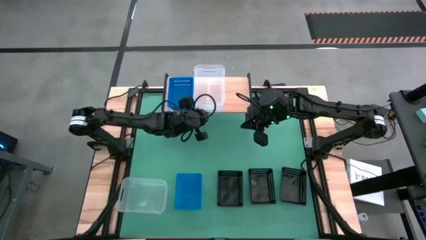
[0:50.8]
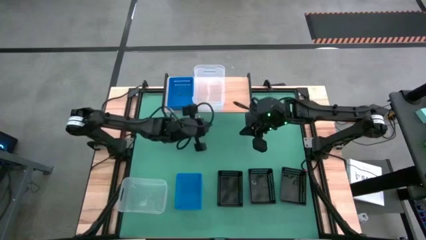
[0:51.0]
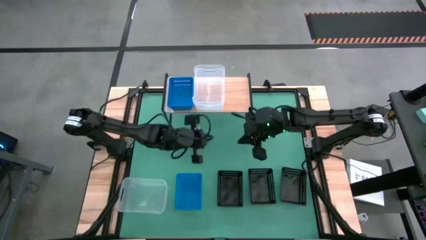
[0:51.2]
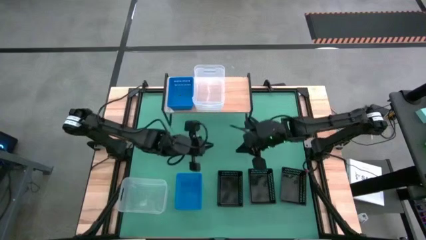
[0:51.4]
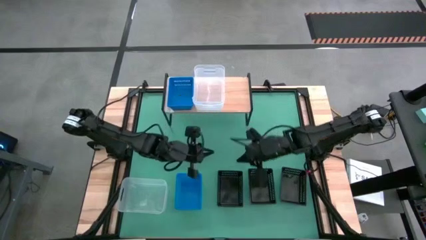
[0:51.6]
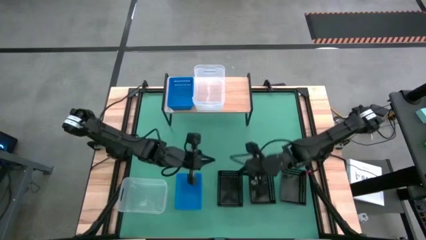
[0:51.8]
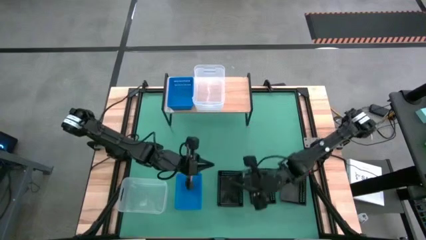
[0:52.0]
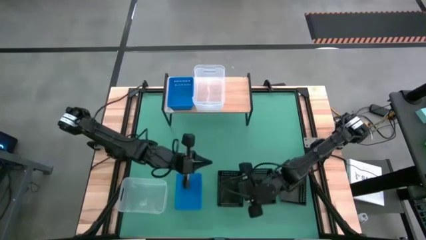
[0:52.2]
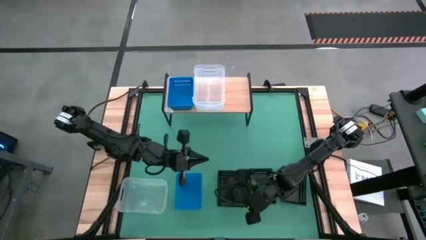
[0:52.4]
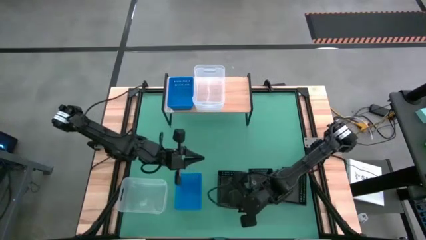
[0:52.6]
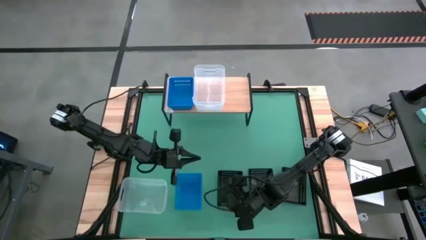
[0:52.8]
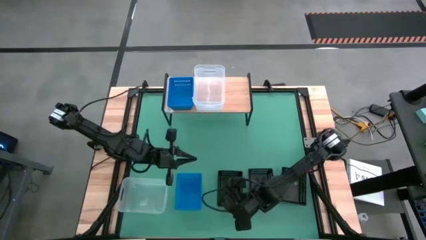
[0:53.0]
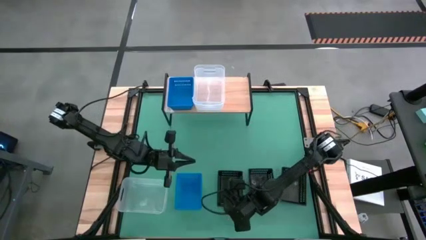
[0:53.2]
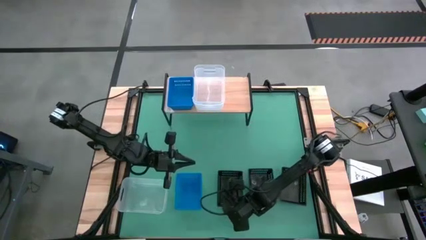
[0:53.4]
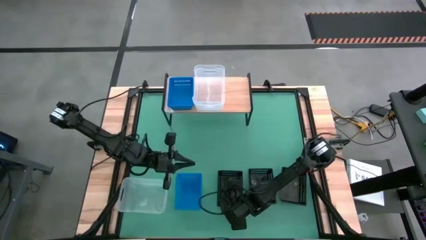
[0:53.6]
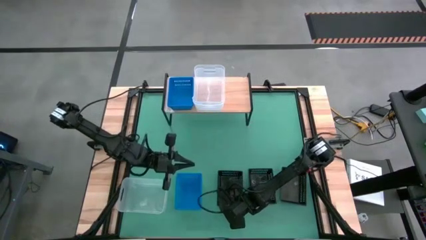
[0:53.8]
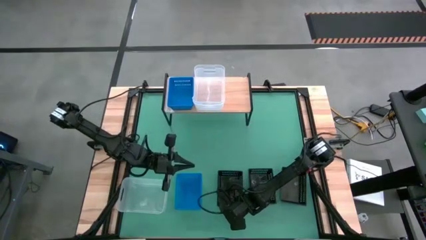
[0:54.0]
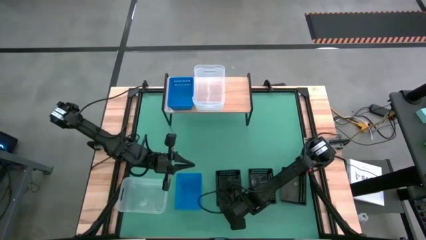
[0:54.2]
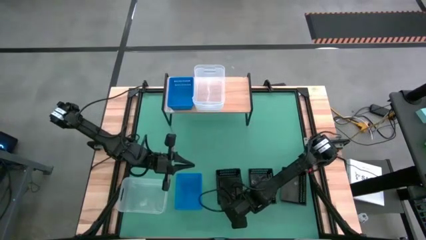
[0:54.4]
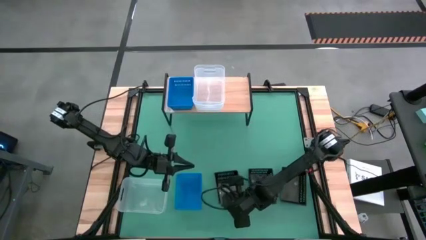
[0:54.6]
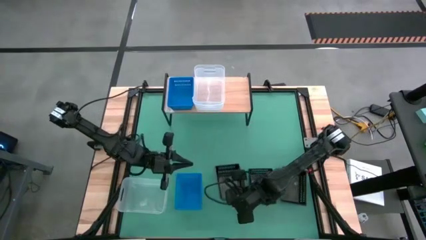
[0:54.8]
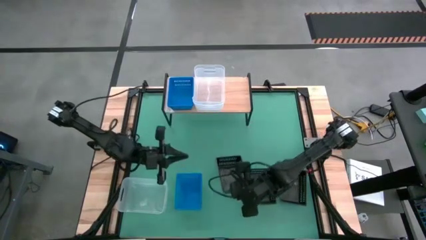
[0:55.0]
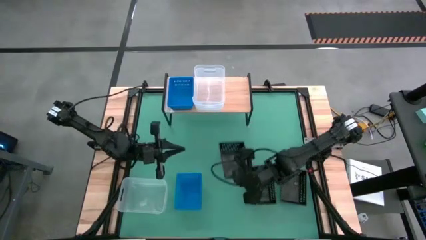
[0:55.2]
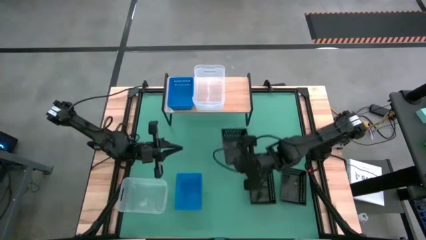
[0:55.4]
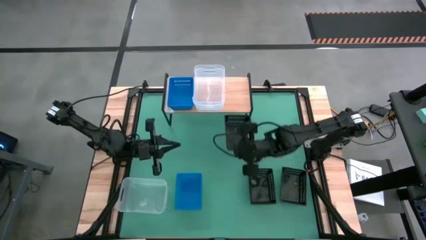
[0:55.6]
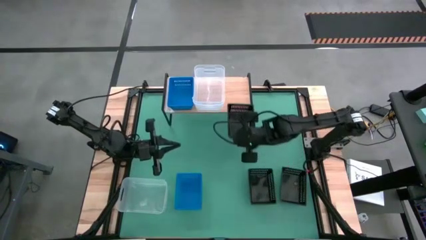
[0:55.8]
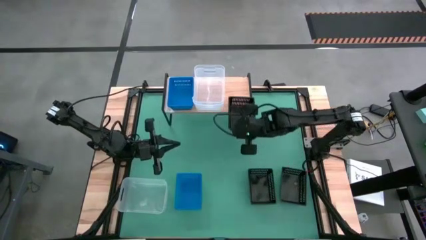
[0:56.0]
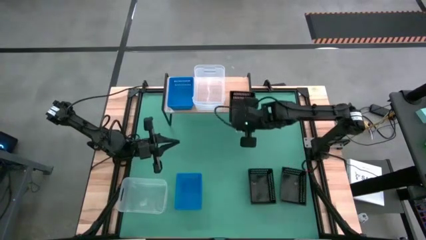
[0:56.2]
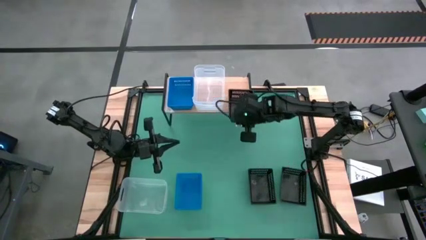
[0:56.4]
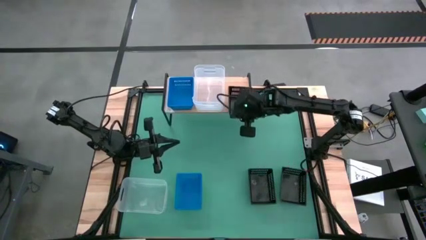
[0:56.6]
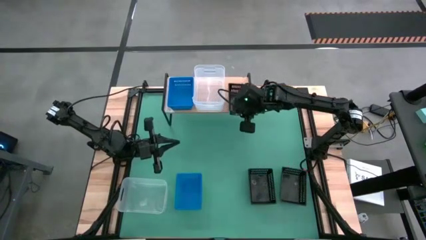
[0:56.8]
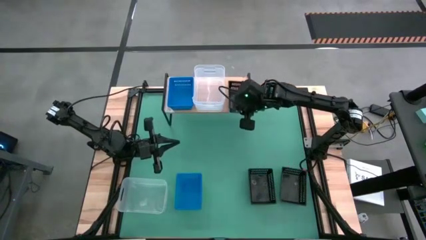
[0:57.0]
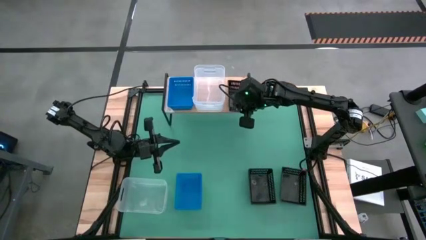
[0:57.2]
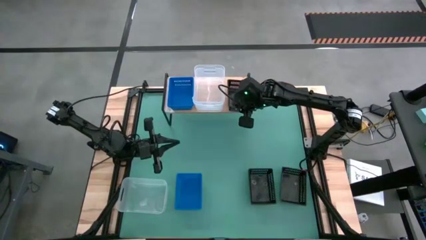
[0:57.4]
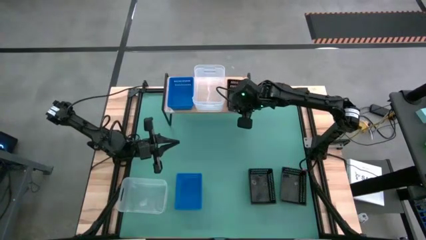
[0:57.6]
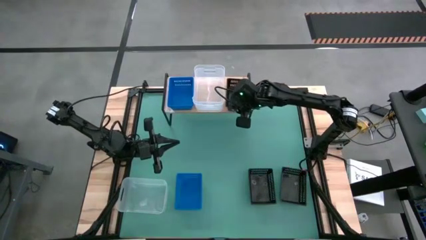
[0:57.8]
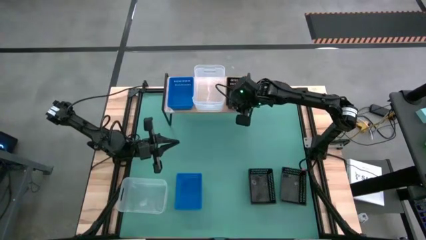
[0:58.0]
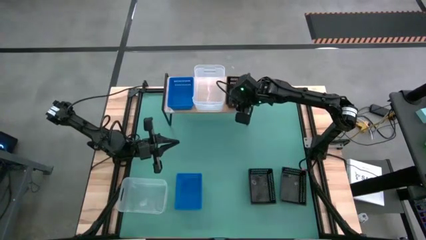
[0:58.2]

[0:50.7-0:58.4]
Task: Stack baskets on shelf by color
Put the left black bin on the shelf

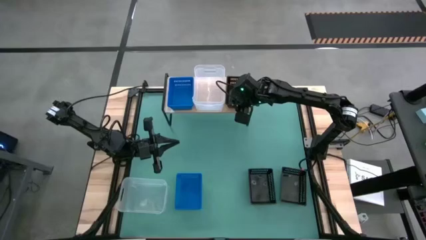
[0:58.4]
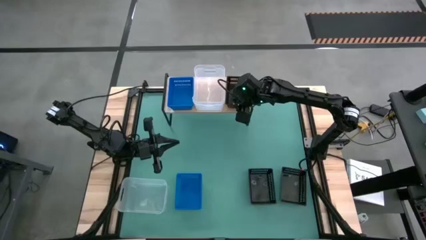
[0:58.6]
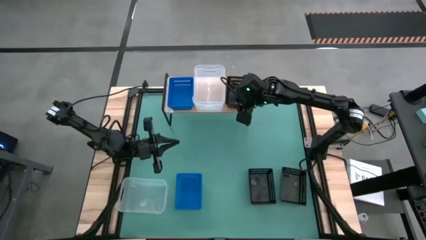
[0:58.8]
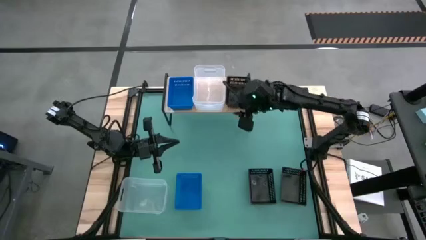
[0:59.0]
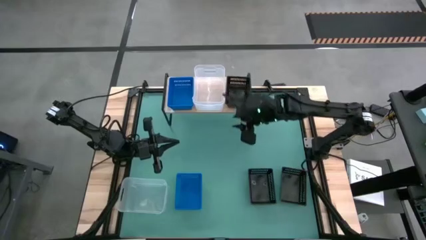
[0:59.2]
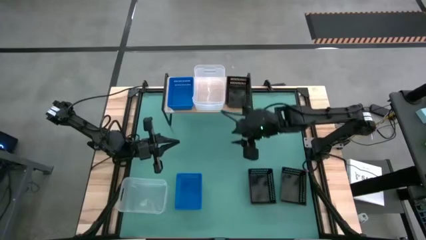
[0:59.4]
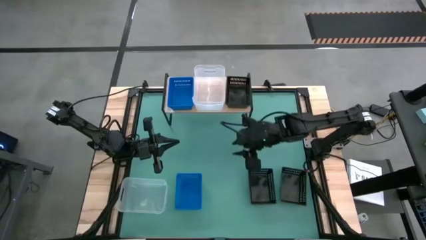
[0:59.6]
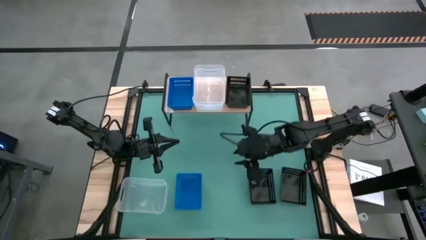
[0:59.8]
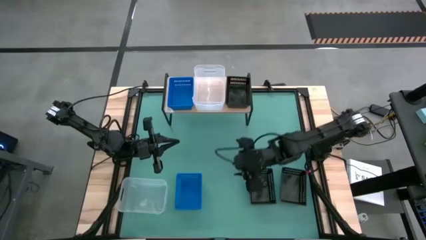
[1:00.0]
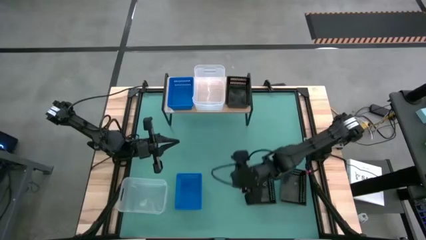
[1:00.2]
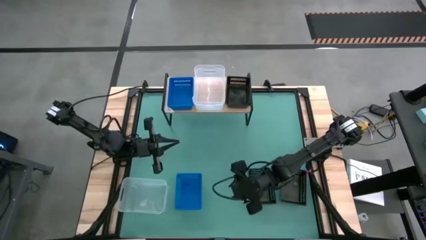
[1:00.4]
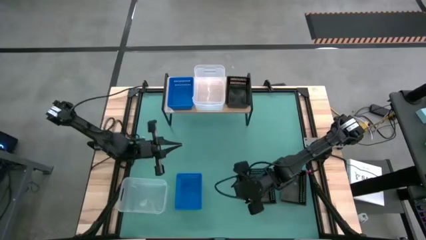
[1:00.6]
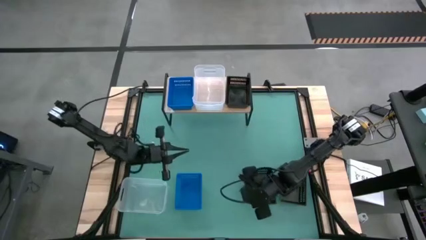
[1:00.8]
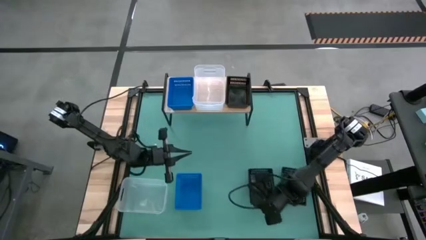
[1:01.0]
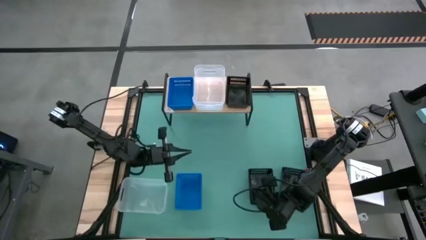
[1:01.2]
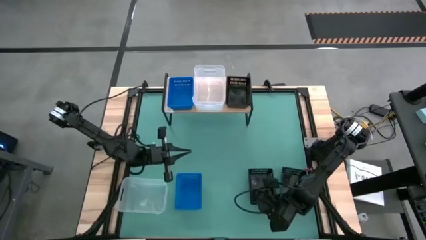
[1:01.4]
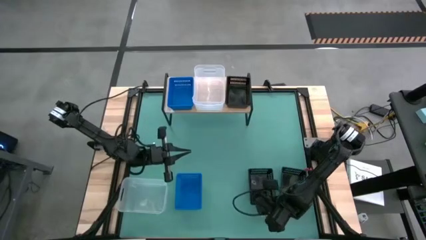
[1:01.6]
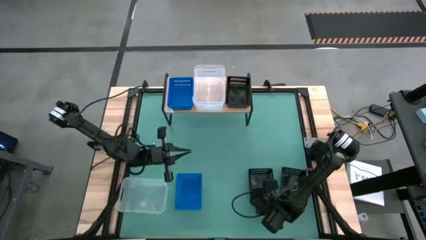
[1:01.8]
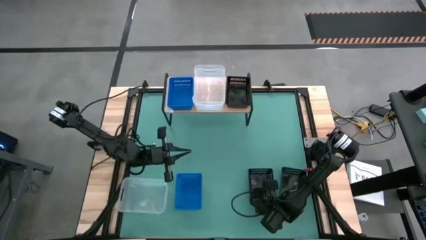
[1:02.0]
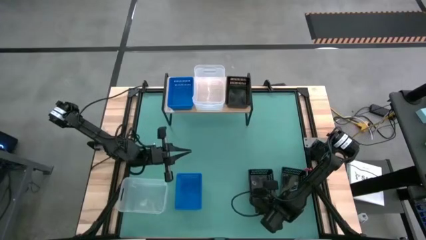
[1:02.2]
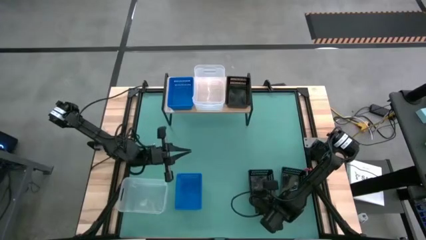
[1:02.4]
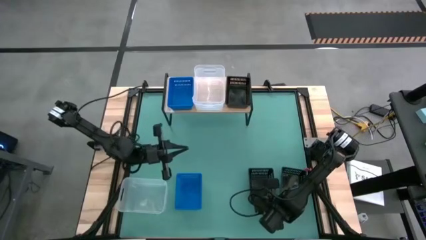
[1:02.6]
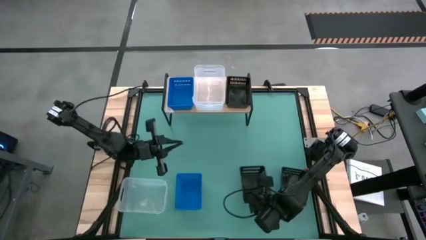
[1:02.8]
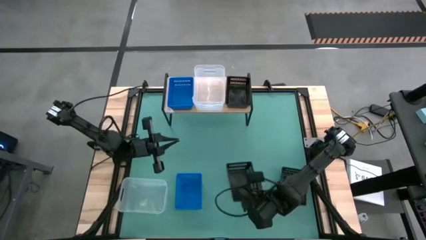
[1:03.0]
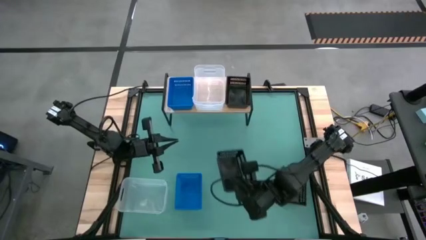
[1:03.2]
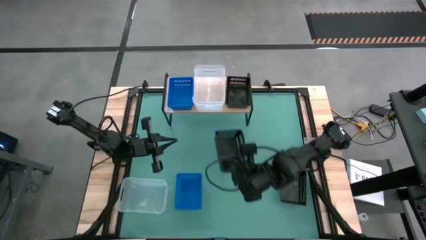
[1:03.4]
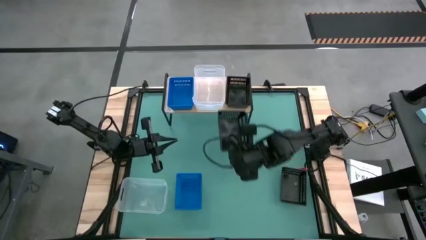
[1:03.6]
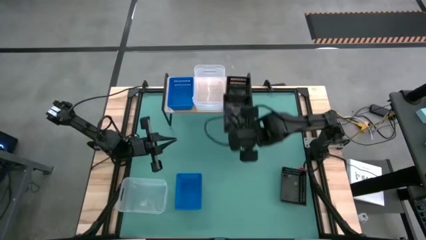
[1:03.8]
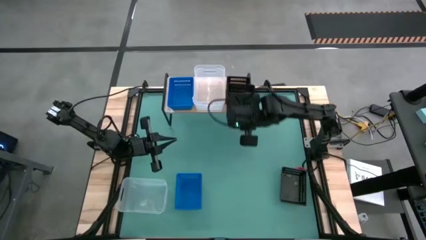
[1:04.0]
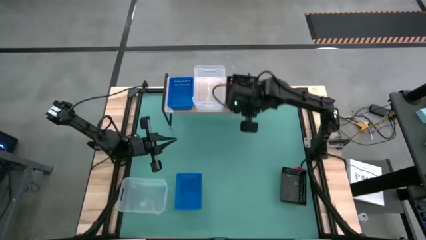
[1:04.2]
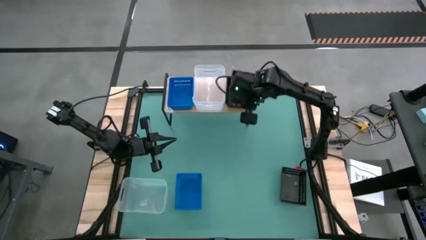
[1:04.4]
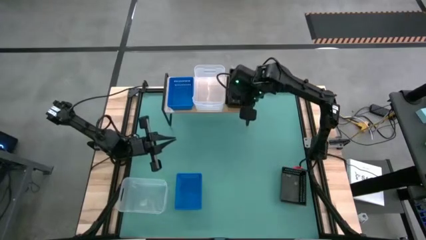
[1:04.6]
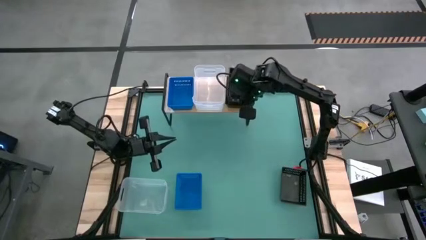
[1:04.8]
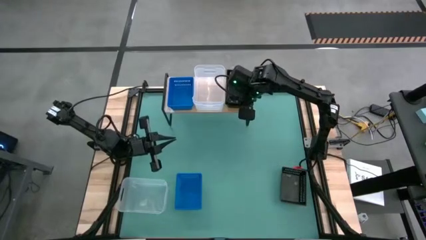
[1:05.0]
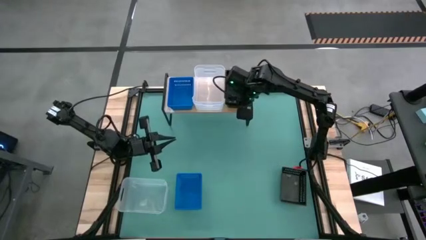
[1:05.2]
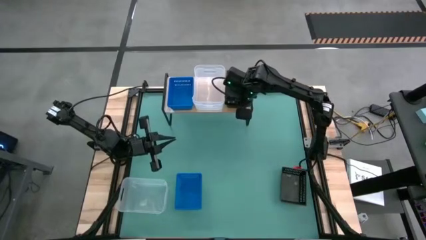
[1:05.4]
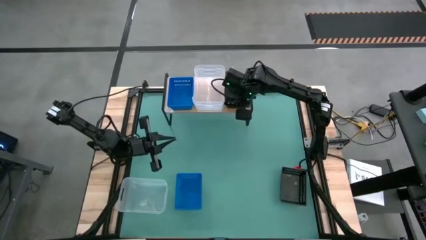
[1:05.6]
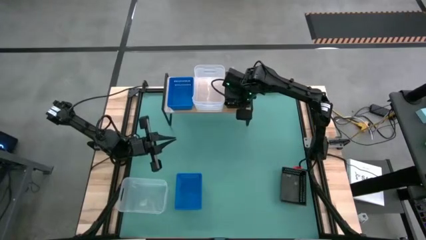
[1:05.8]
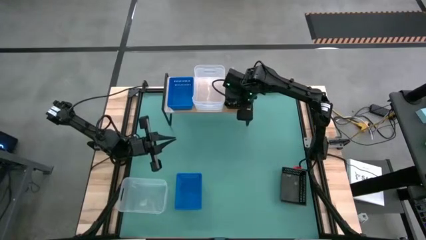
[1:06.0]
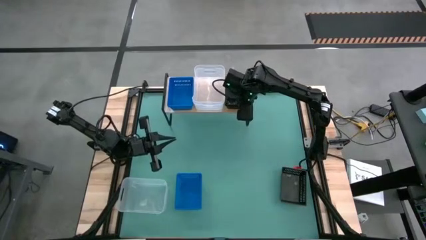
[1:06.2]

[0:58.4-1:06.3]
Stack the left black bin on the black bin on the shelf

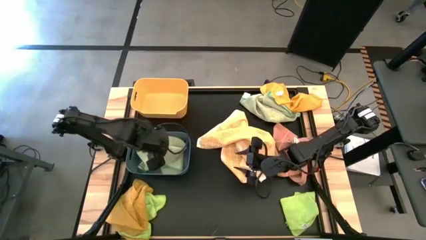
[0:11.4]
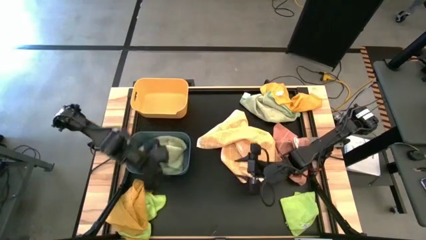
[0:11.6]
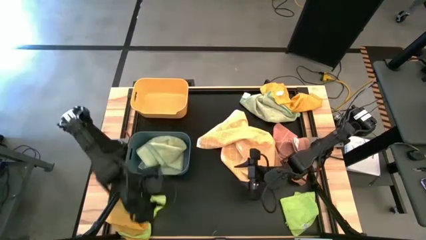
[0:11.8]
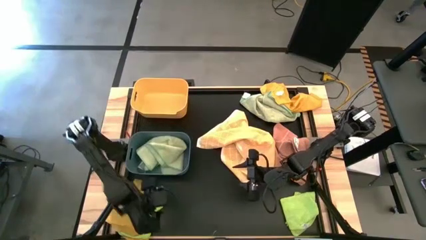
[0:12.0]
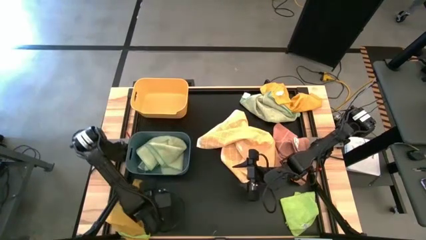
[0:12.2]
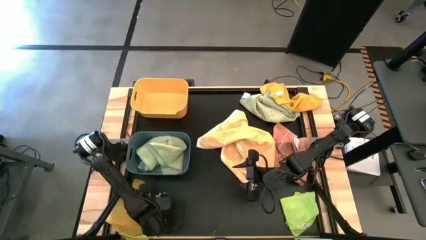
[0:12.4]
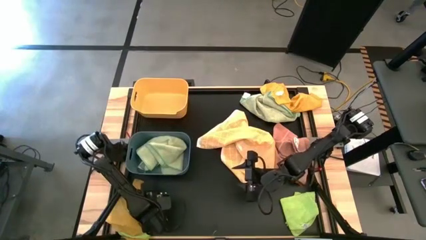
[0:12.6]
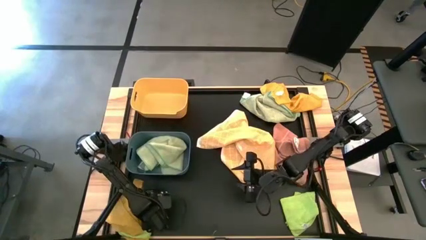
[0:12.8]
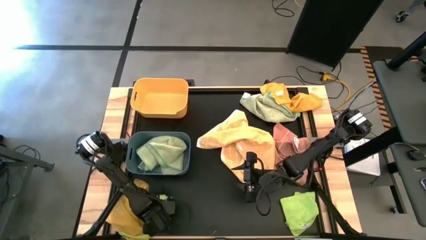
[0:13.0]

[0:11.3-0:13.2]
Task: Sort microfiber towel by color & place in baskets
Put the left green microfiber towel into the blue bin
